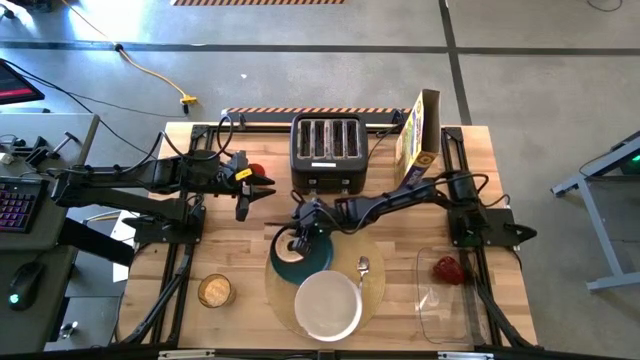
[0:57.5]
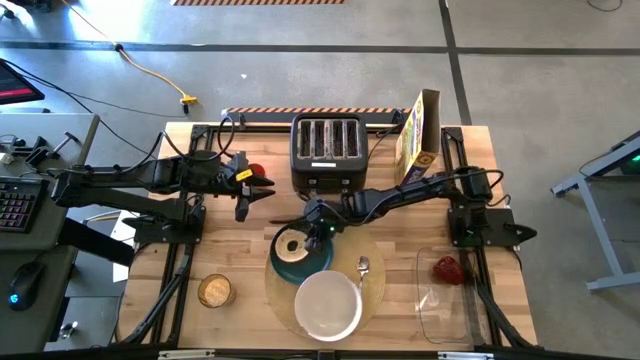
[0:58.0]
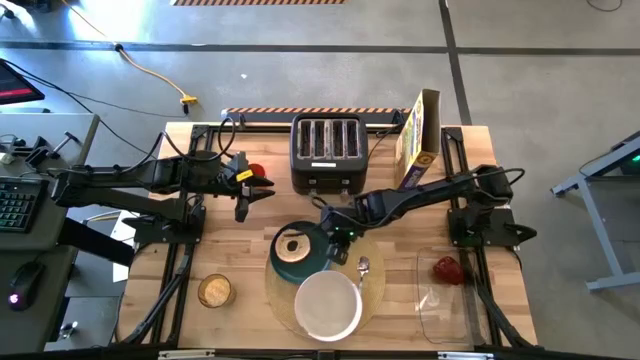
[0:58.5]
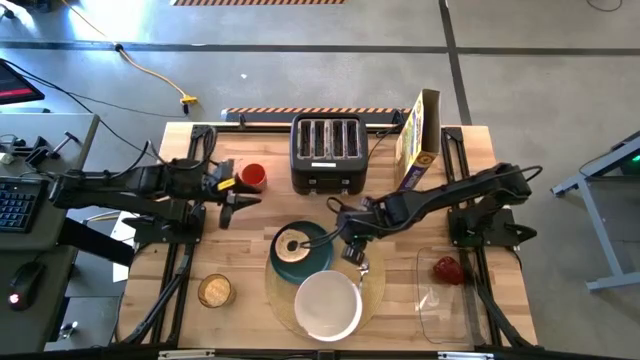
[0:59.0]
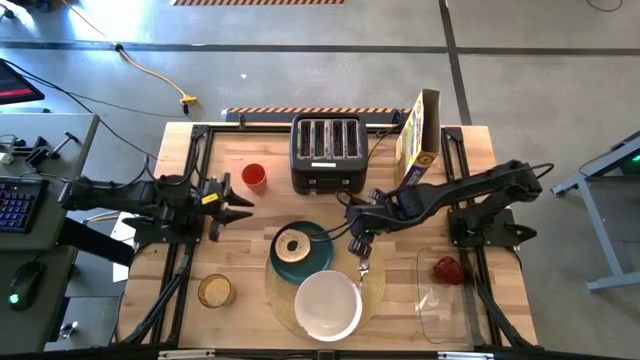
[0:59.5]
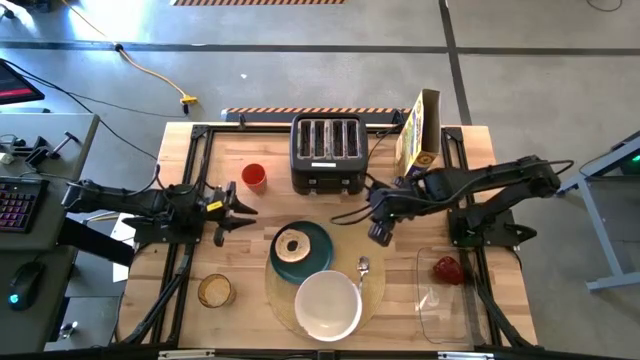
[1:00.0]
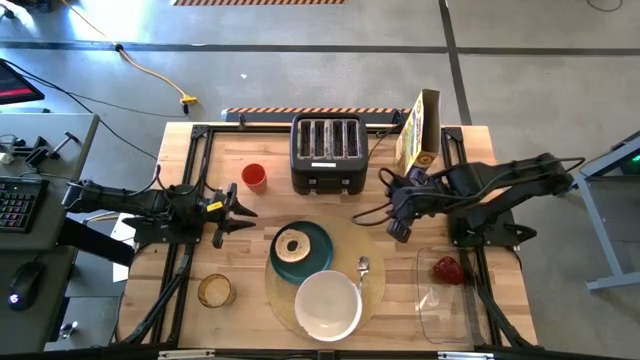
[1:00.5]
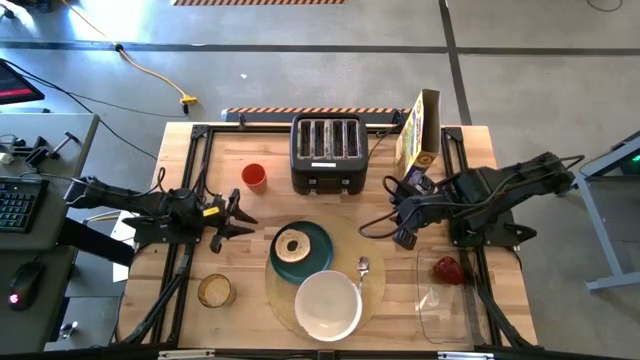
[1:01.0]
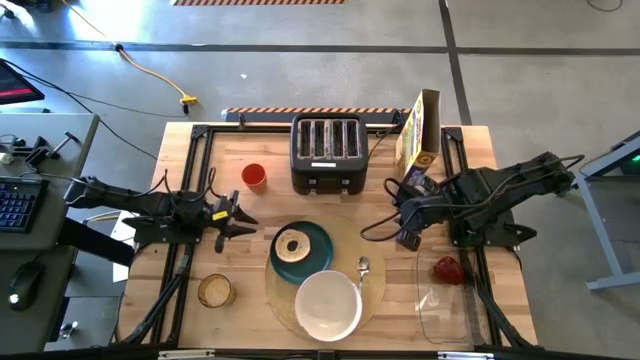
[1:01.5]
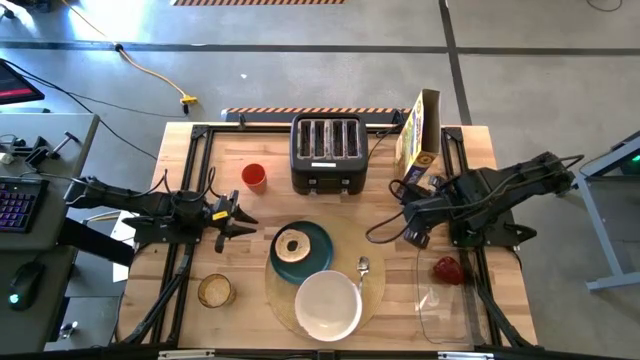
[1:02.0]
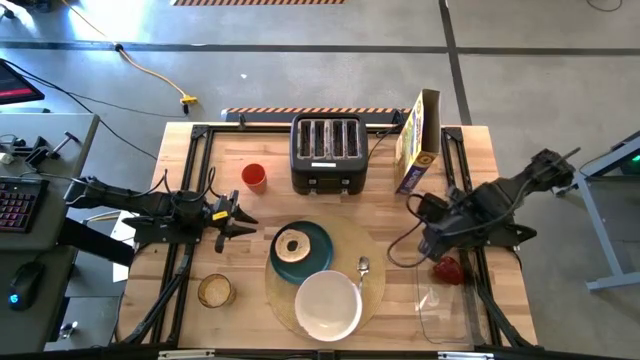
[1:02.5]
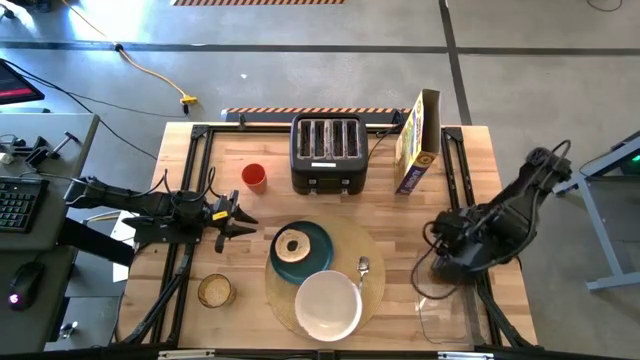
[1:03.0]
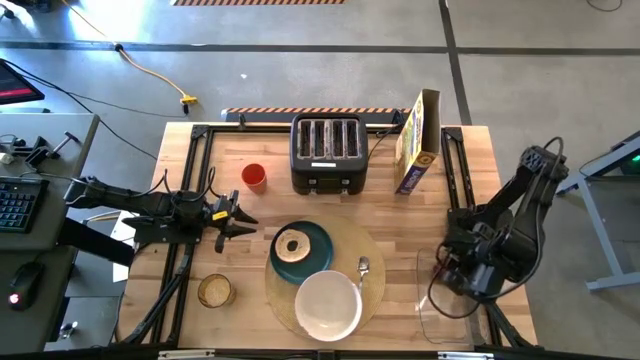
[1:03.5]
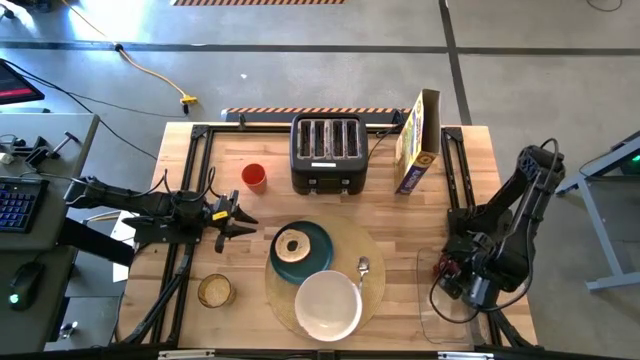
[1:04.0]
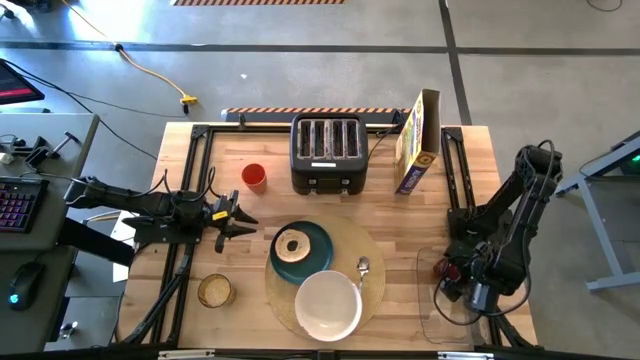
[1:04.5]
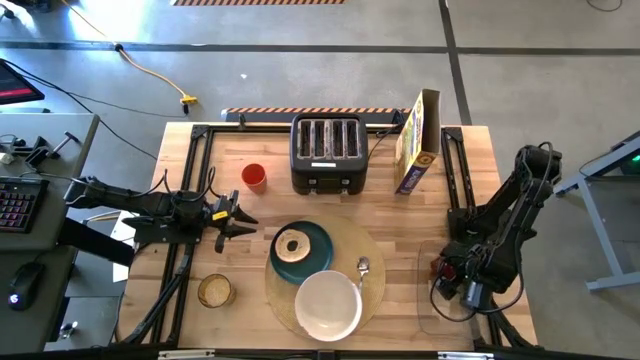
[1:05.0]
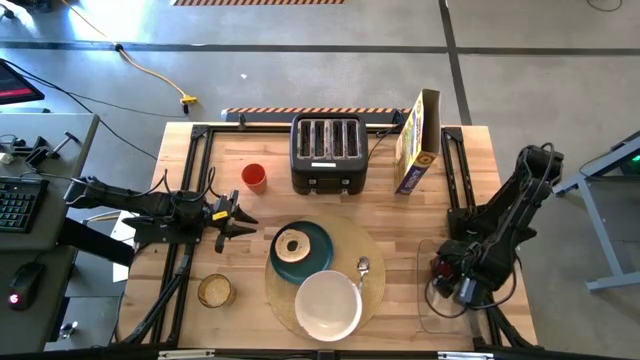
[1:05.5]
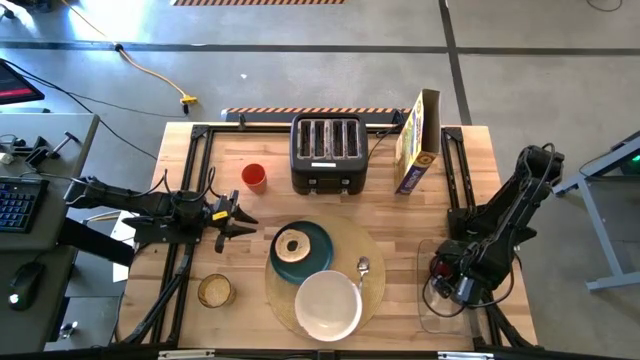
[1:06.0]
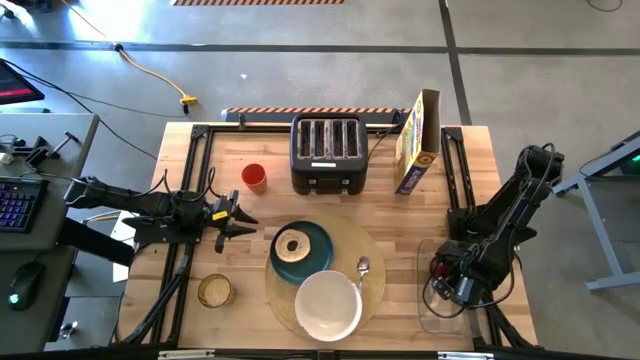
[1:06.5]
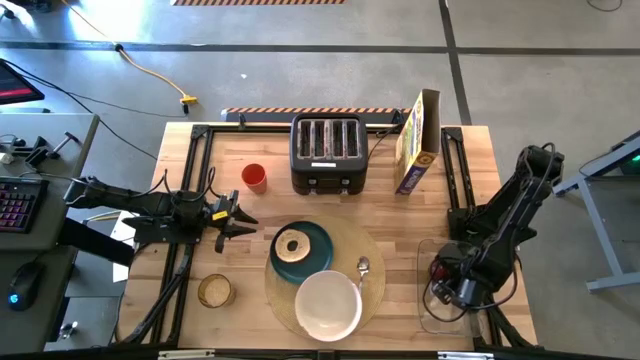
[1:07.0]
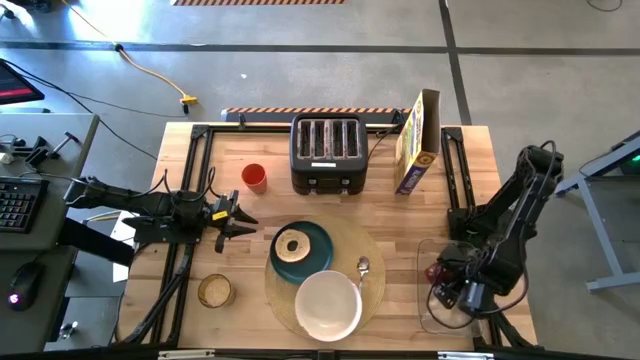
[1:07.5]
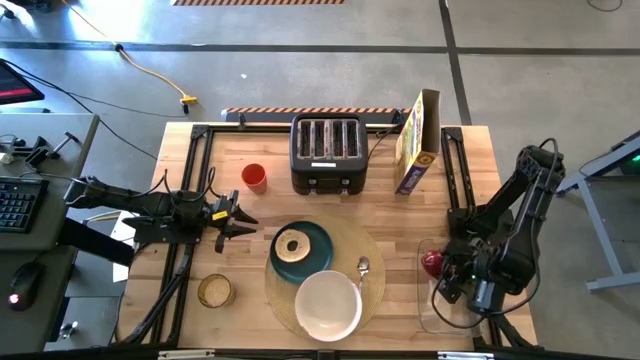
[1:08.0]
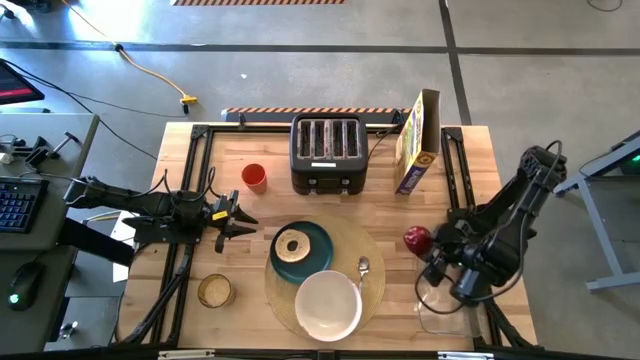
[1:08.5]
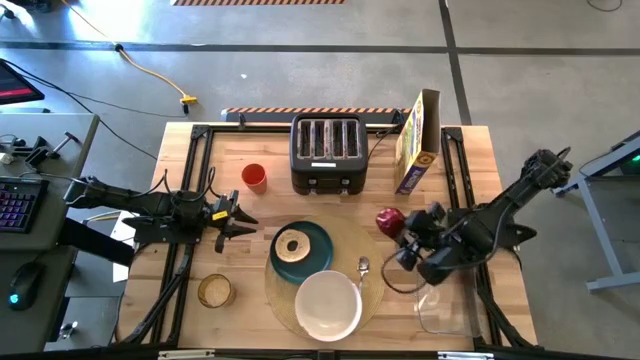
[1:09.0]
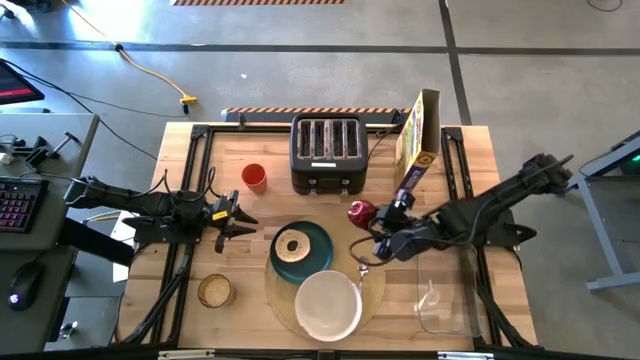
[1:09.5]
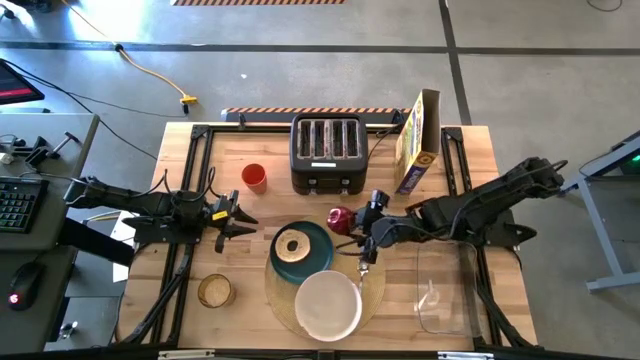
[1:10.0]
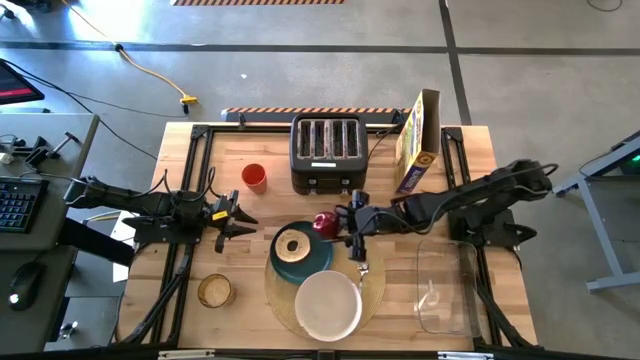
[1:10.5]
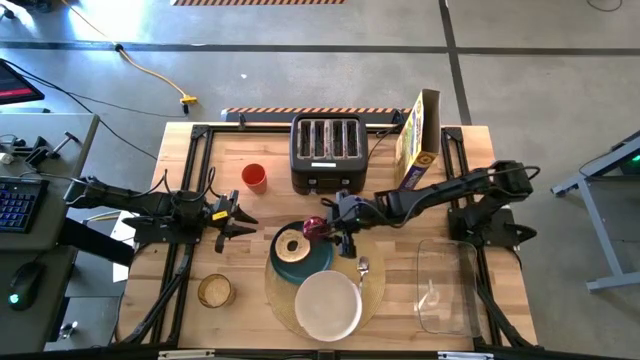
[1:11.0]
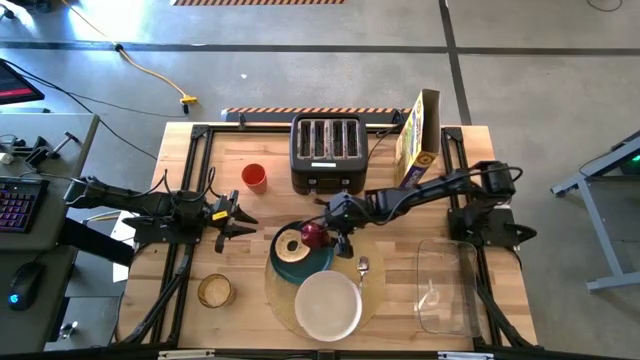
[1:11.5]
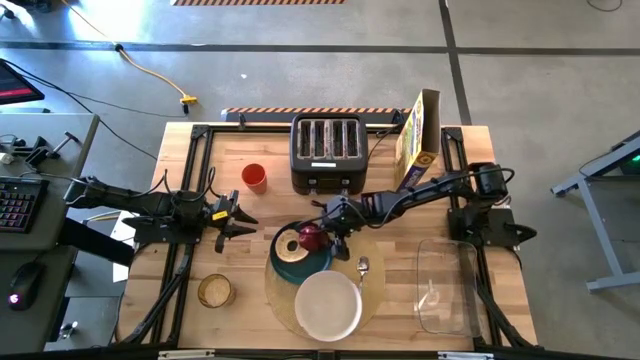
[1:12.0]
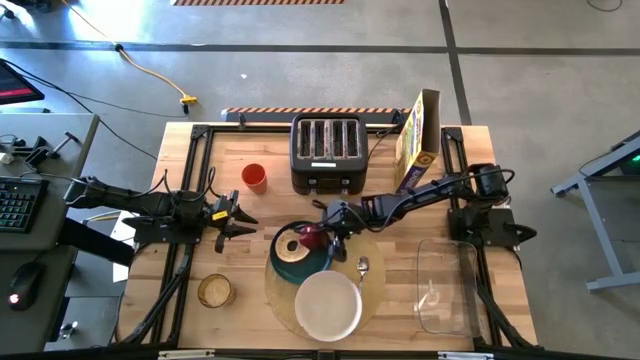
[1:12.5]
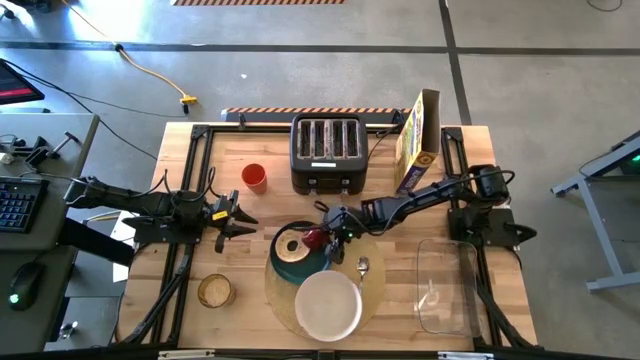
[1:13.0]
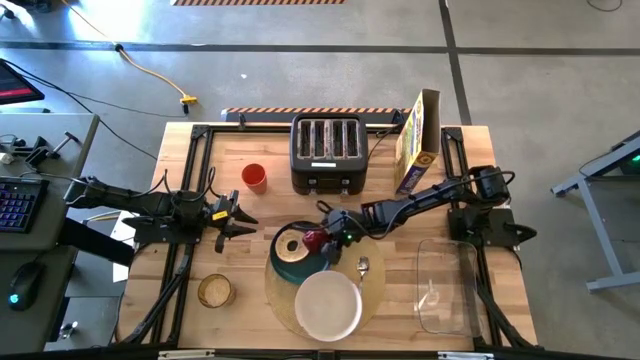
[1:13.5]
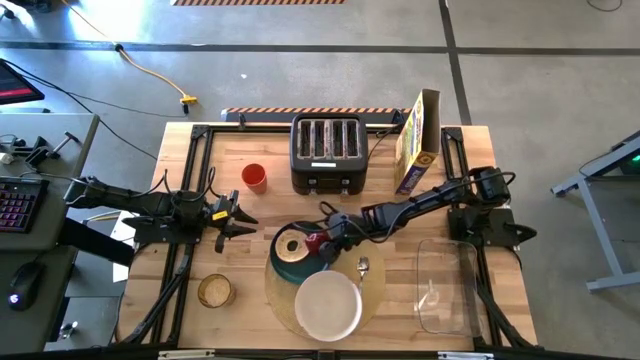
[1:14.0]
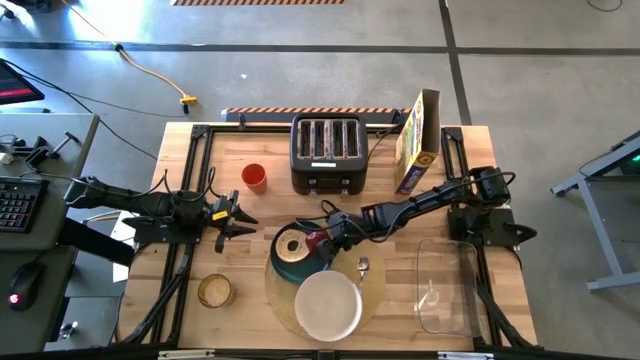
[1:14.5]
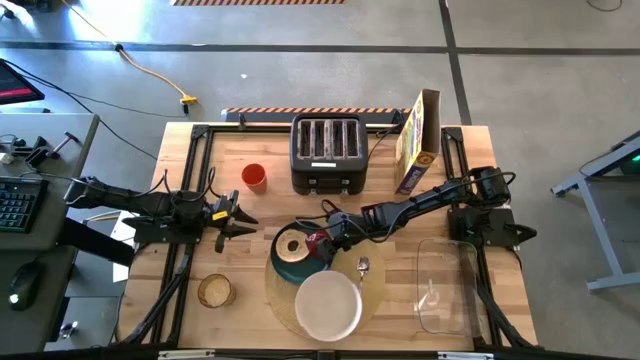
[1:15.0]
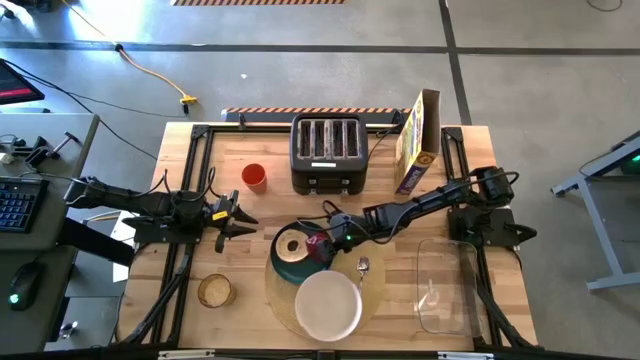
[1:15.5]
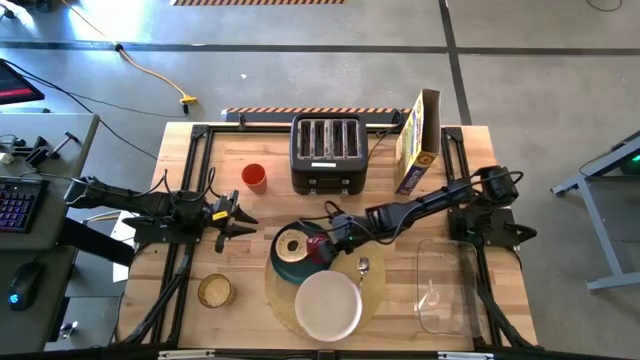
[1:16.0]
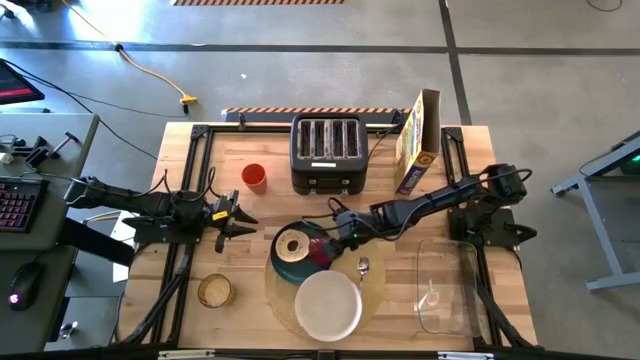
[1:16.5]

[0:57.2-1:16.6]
Task: Arrange a breakfast setting
Put the red apple on the green plate

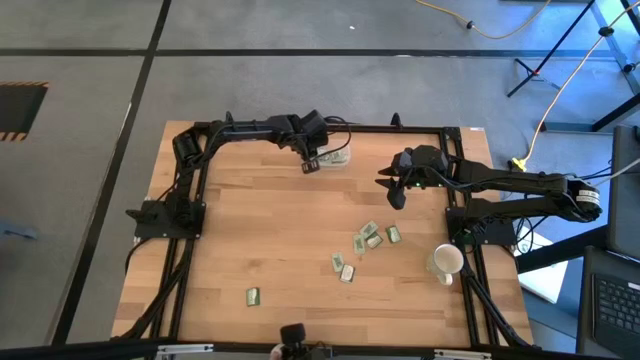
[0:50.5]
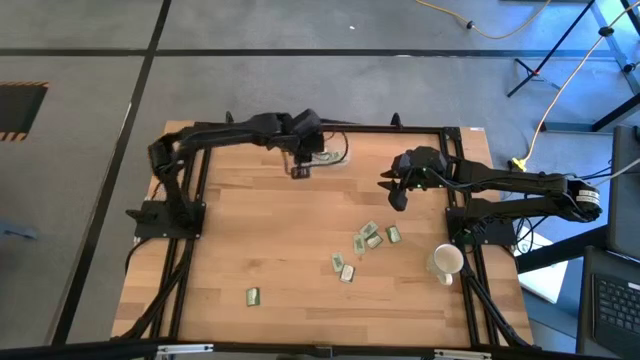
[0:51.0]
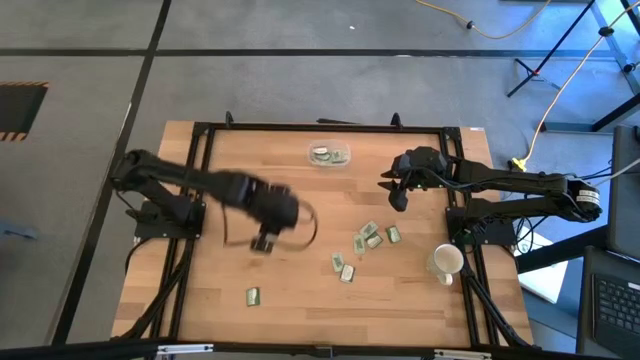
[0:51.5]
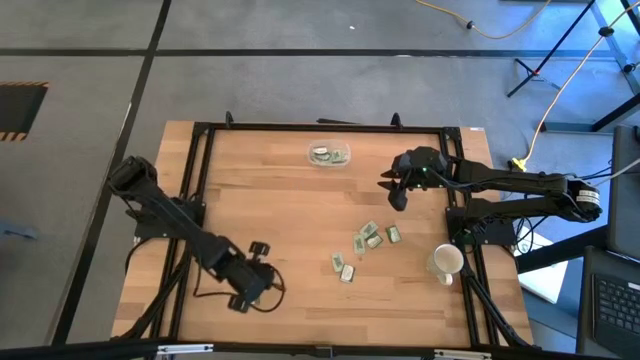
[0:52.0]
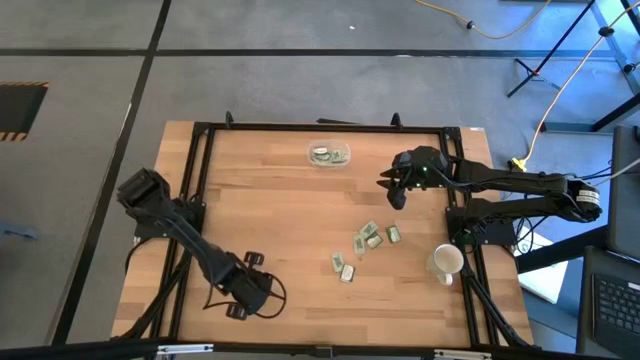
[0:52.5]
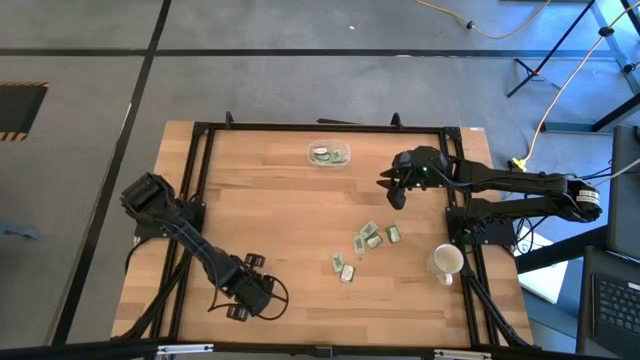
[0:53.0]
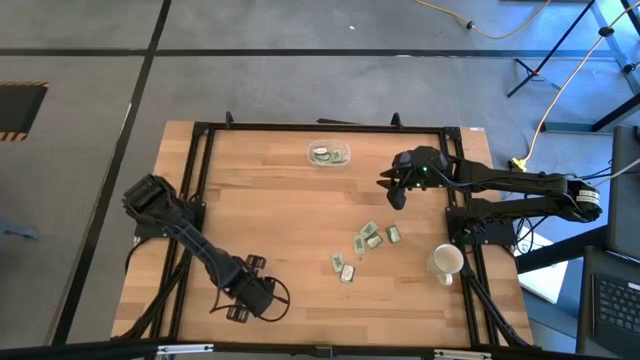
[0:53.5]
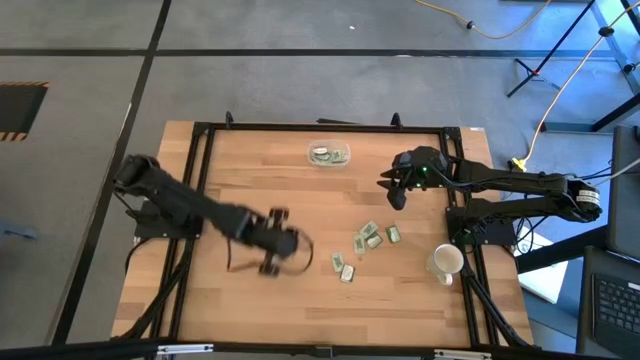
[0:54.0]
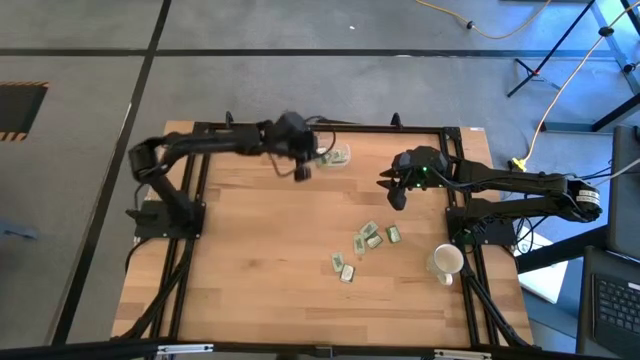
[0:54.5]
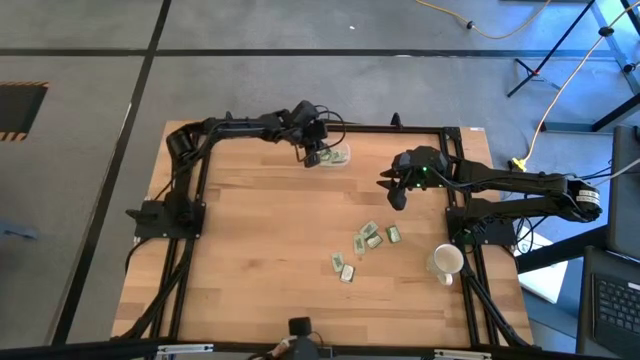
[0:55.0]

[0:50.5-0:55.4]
Task: Pick and place items into bin
Put the green stevia packet into the transparent bin
